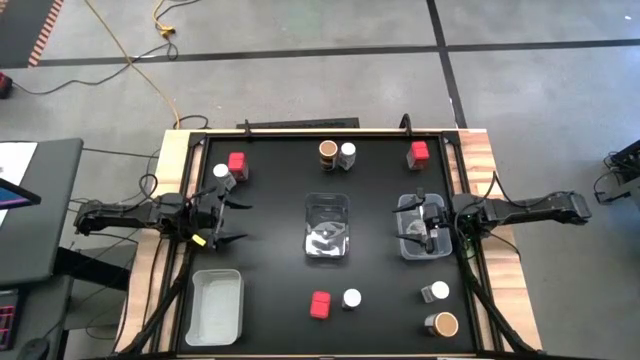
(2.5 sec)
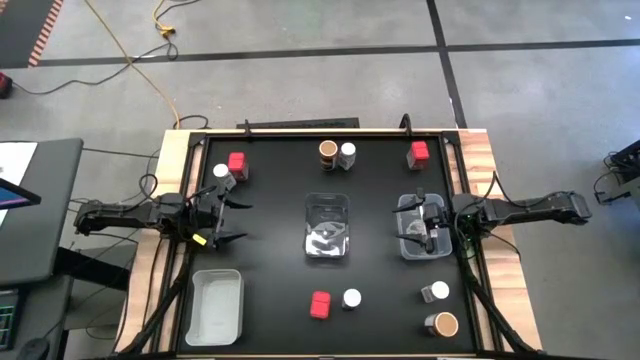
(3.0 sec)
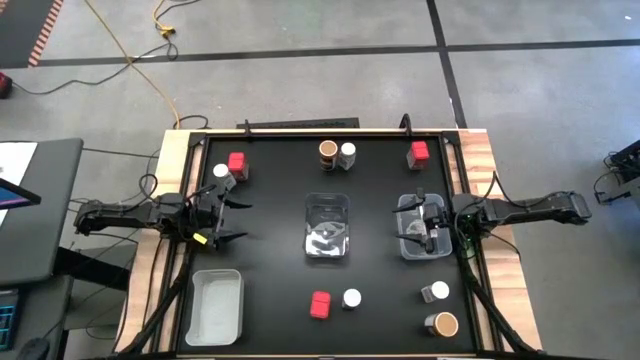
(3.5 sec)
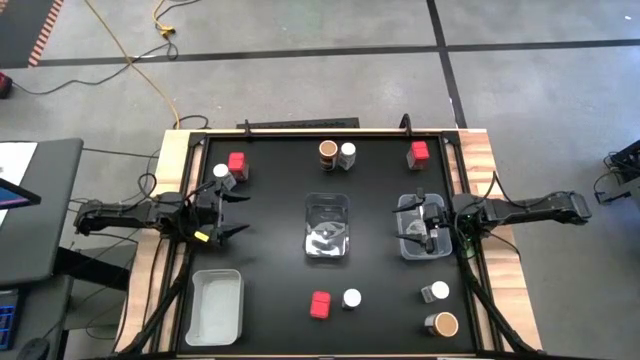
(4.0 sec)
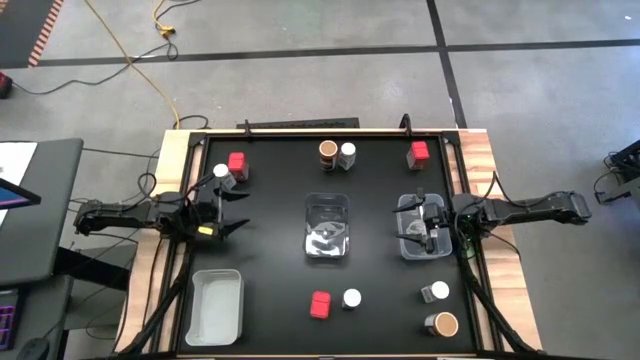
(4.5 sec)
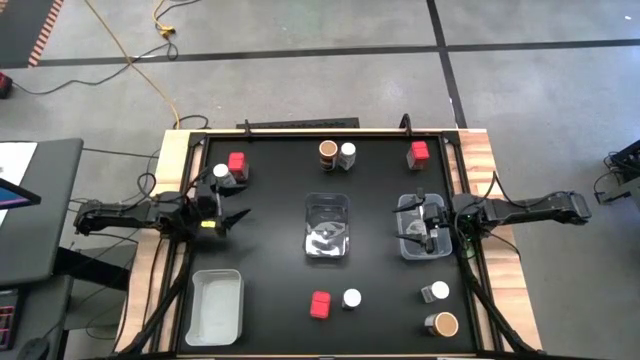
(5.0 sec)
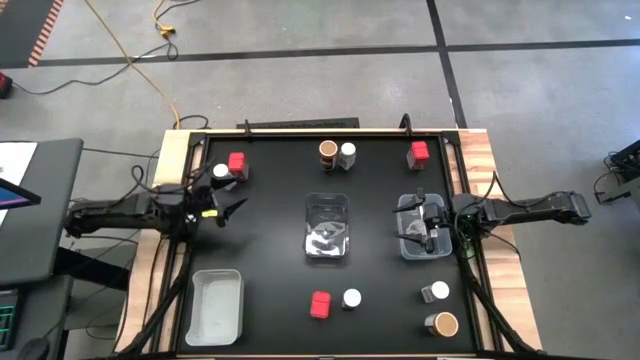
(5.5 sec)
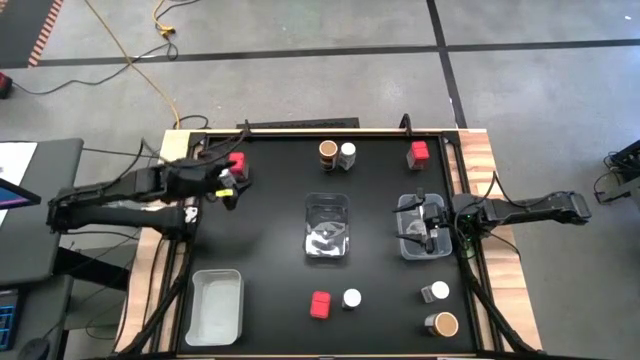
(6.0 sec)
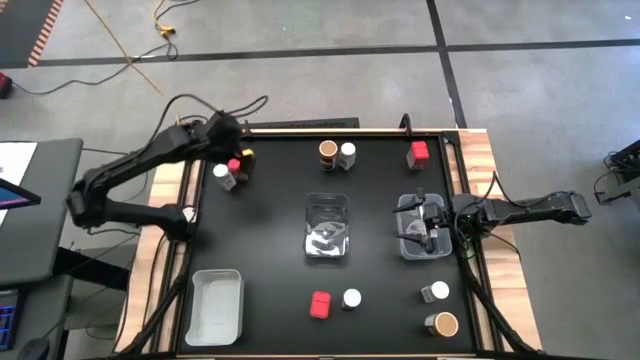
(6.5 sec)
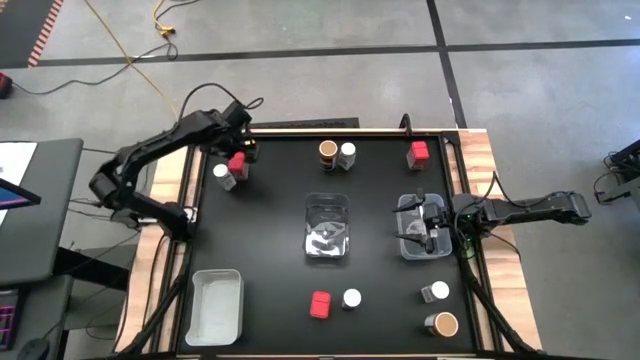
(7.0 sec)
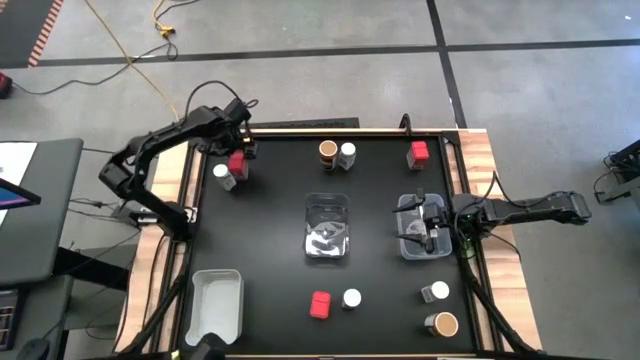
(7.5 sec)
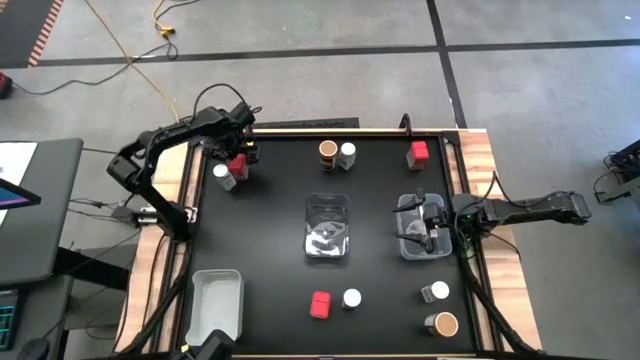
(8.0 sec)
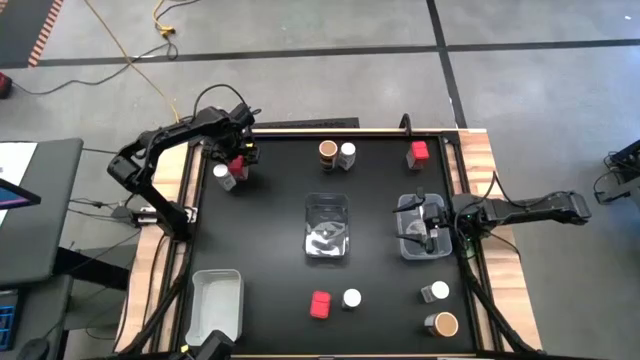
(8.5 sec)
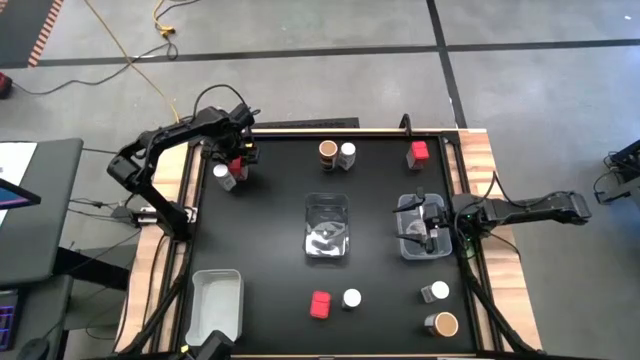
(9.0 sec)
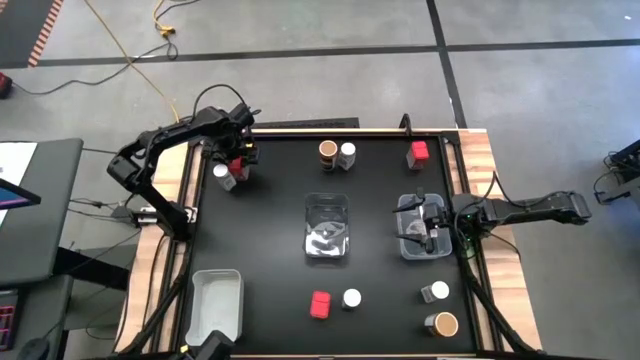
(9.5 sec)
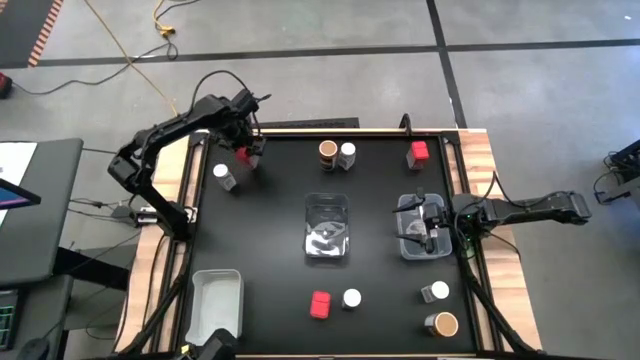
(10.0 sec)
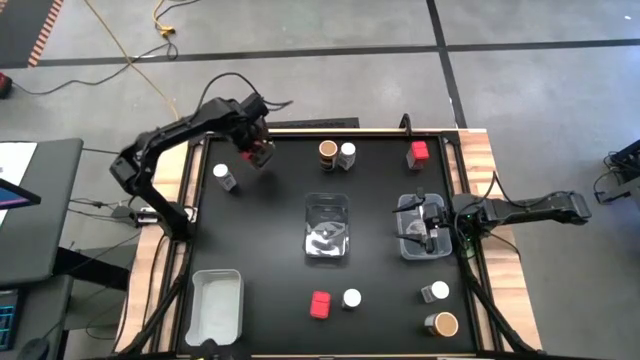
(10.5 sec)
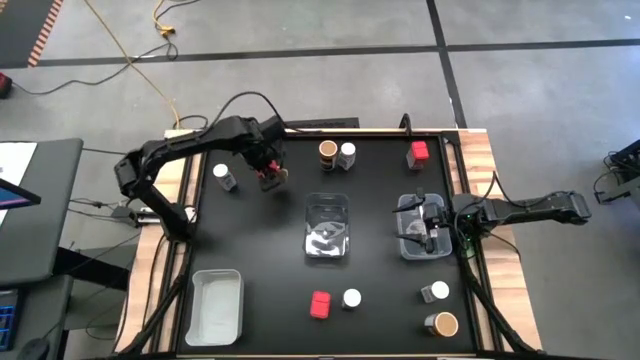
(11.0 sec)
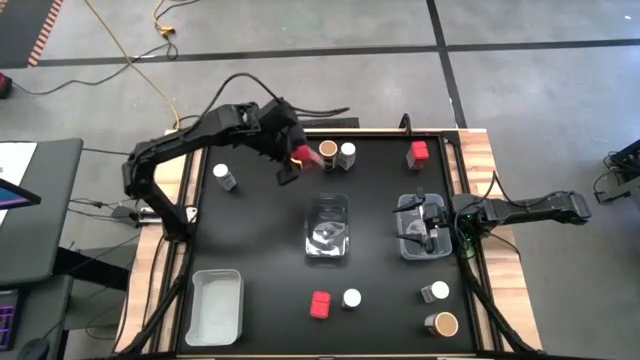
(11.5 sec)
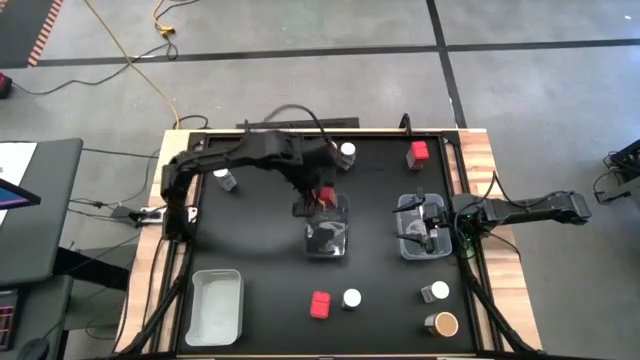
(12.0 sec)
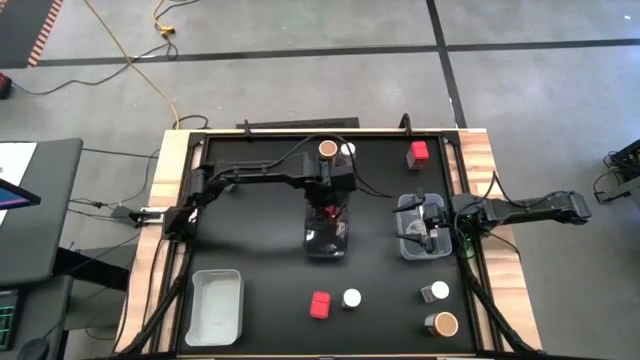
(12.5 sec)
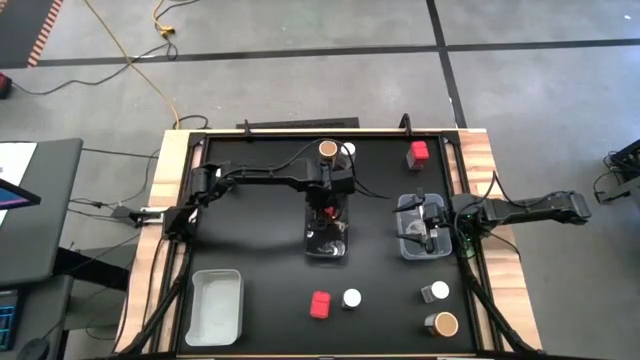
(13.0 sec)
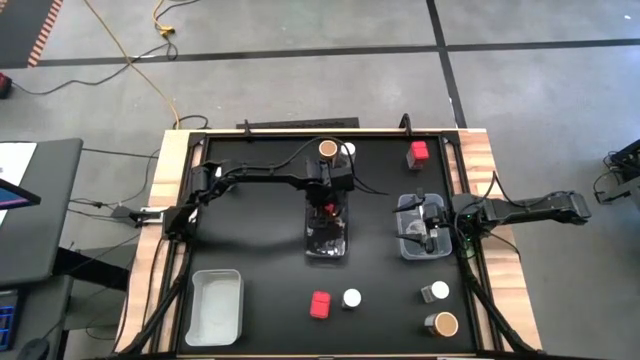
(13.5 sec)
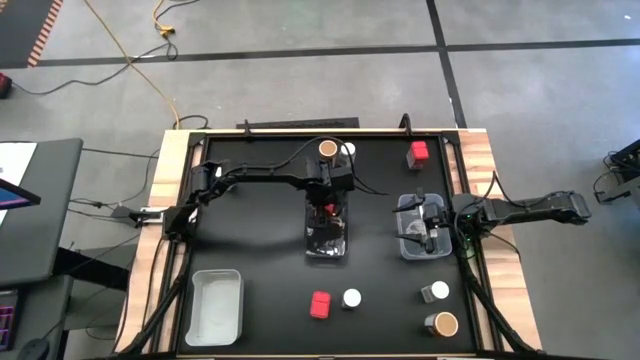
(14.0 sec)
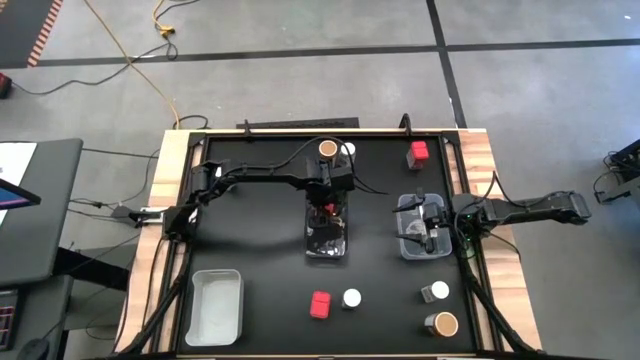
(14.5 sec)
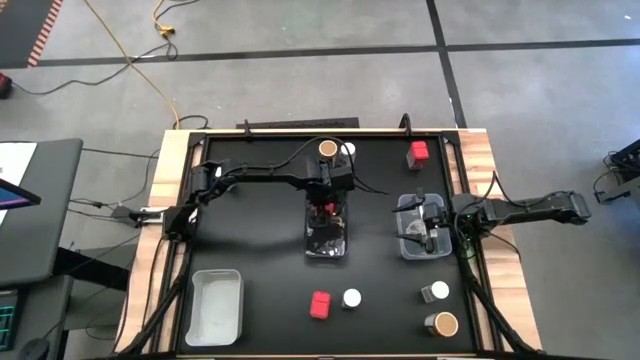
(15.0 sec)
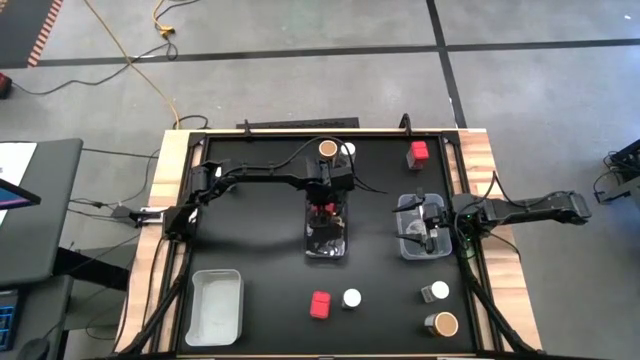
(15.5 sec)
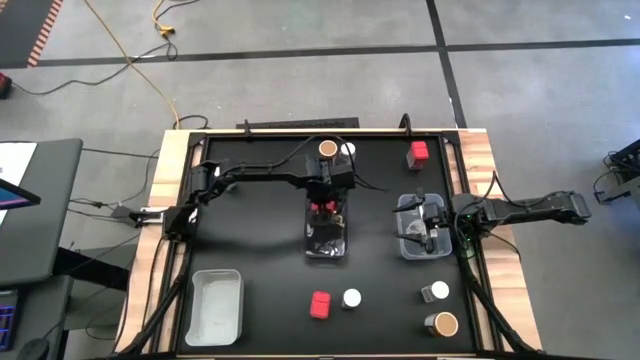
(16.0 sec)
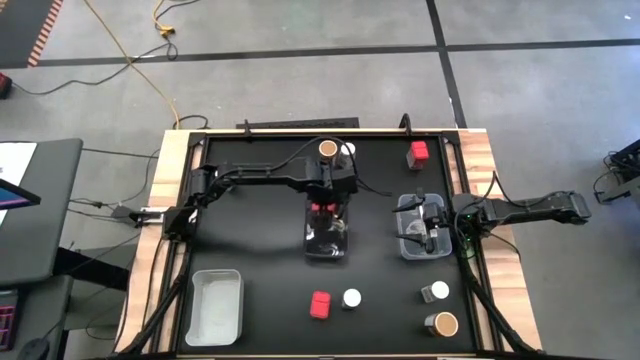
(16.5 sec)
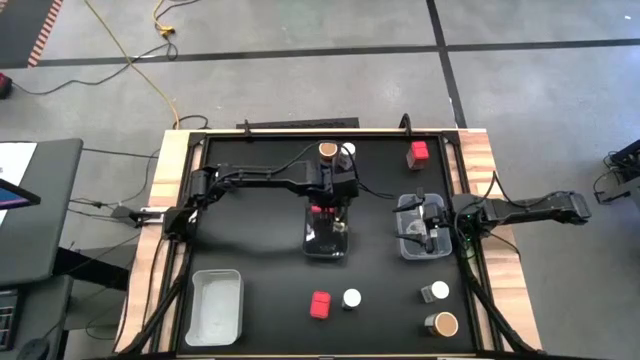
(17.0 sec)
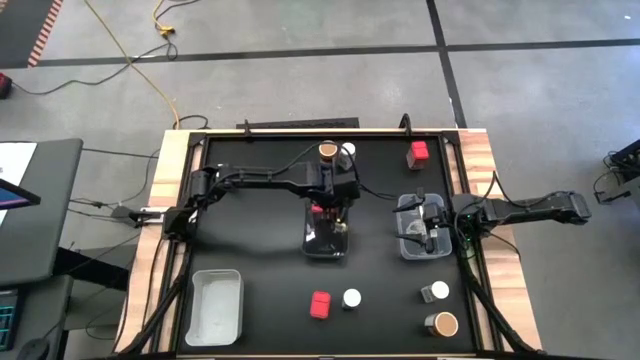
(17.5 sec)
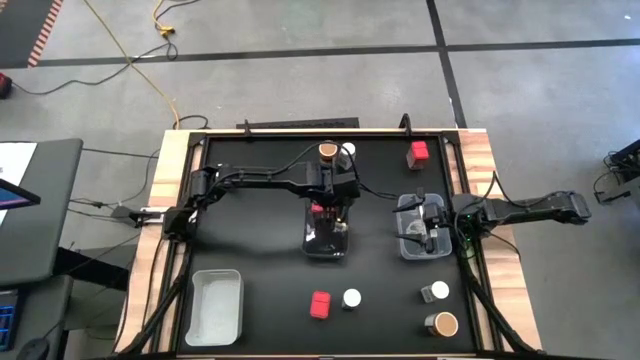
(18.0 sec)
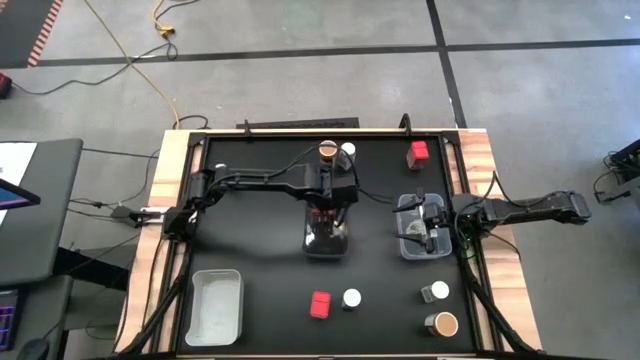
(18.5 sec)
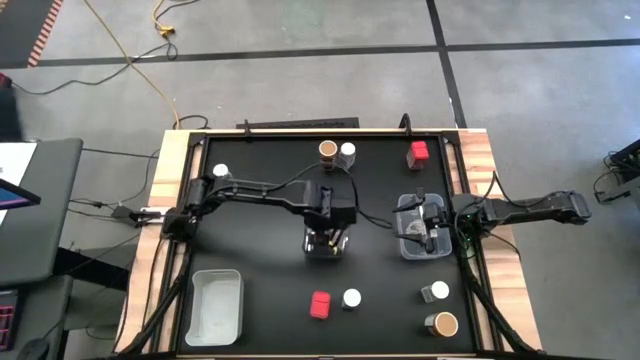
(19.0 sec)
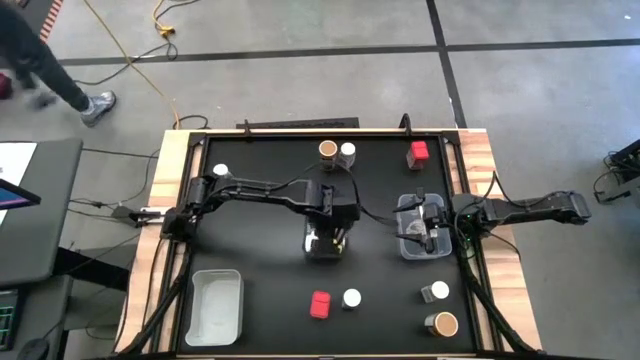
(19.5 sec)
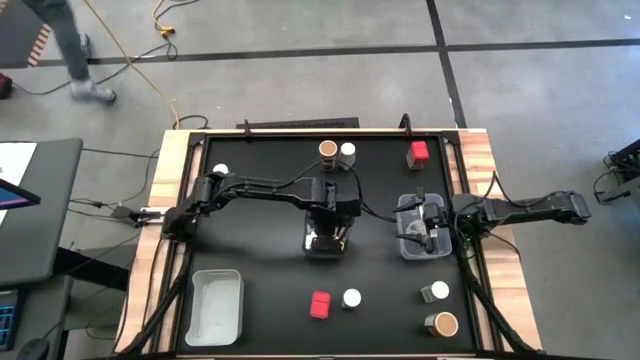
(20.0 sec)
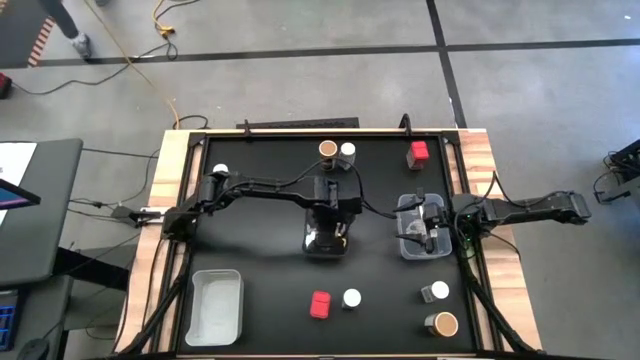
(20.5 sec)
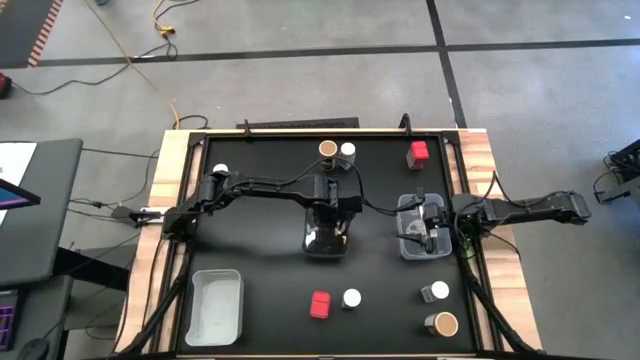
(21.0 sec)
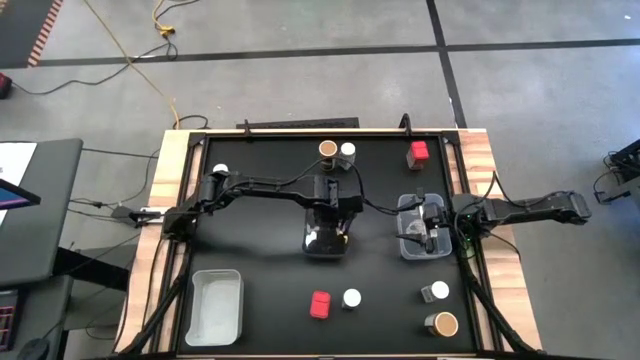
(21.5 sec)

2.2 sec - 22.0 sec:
Task: Sort spices by type
Put the red seasoning can into the black bin
